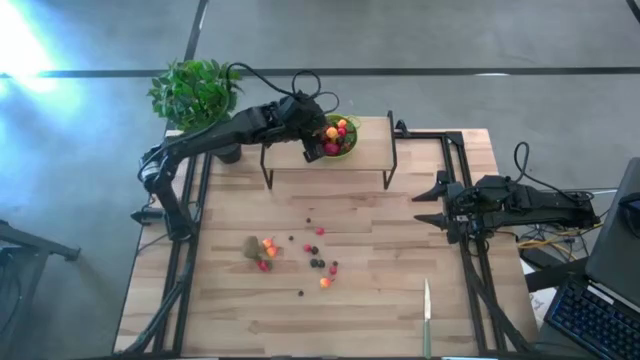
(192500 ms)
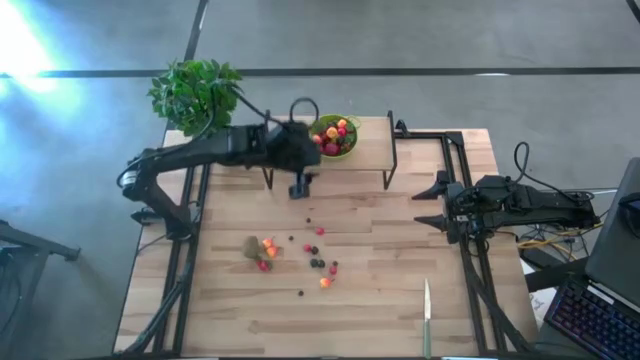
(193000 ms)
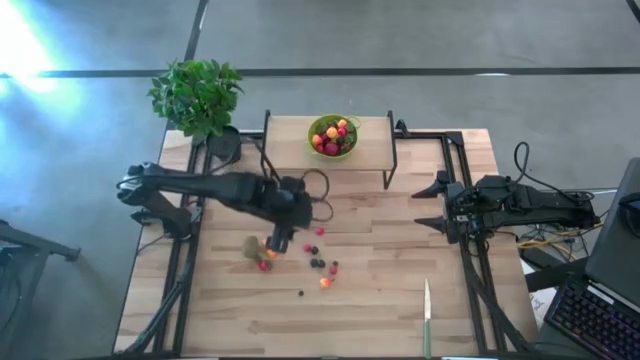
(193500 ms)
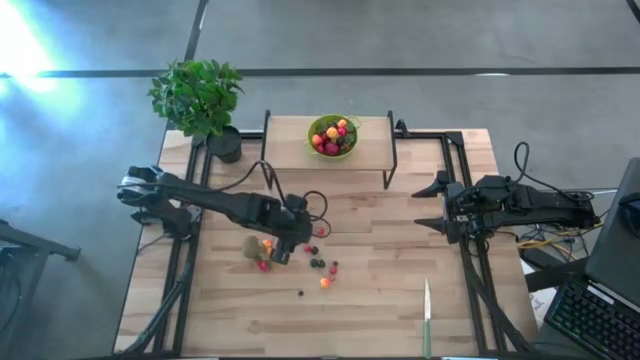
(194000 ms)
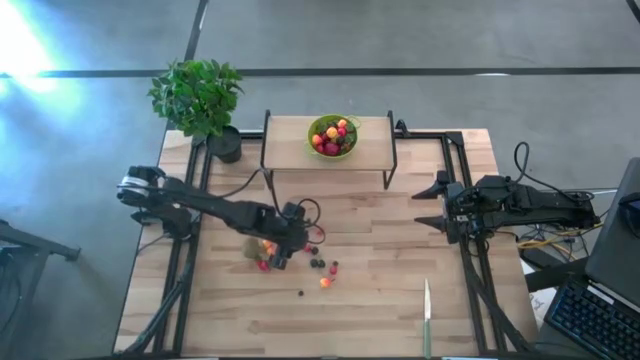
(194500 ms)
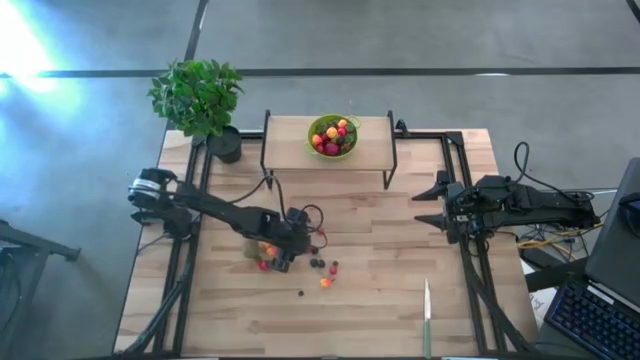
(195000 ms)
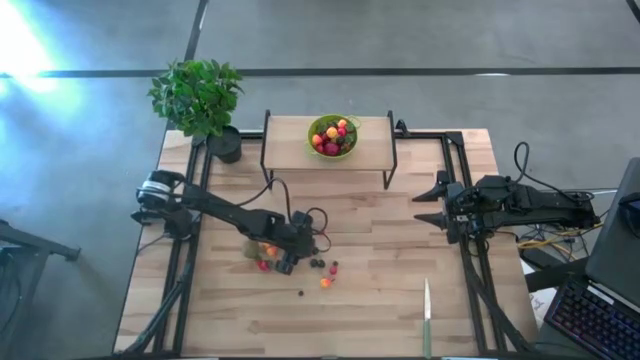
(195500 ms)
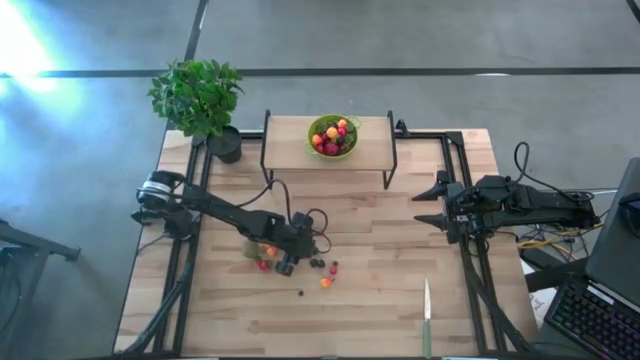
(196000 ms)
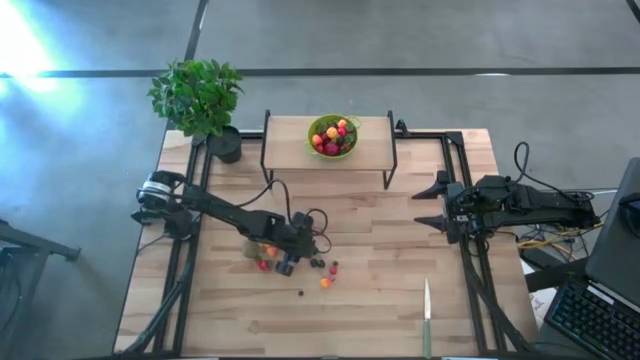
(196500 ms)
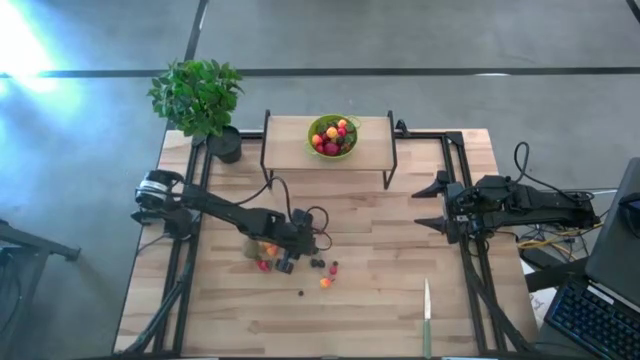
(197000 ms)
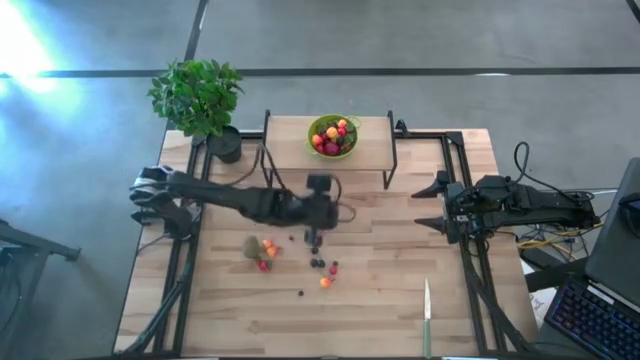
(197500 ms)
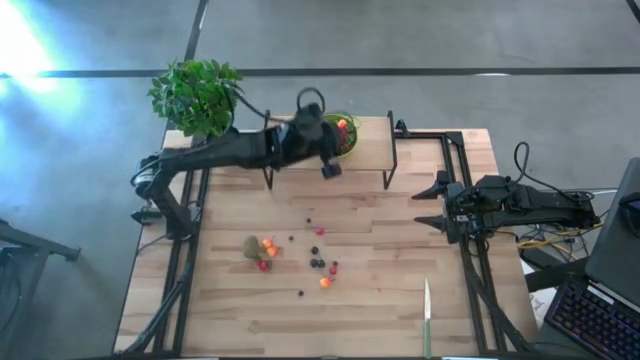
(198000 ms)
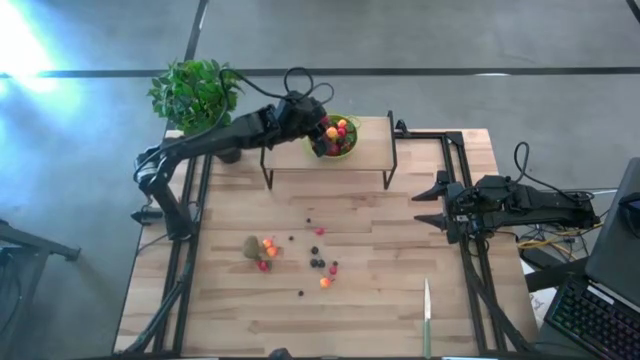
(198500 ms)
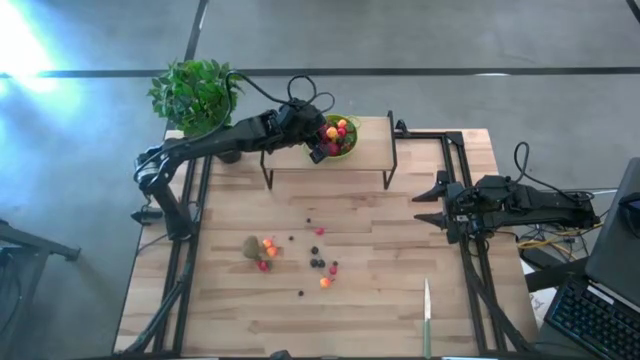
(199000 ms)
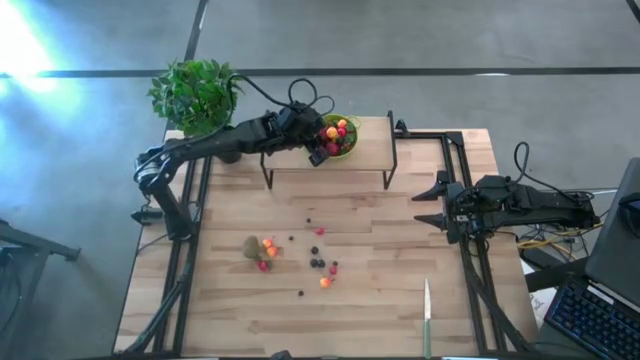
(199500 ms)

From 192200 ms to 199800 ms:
Task: Pick & Place Fruit
Put the red raspberry into the green strainer bowl on the shelf

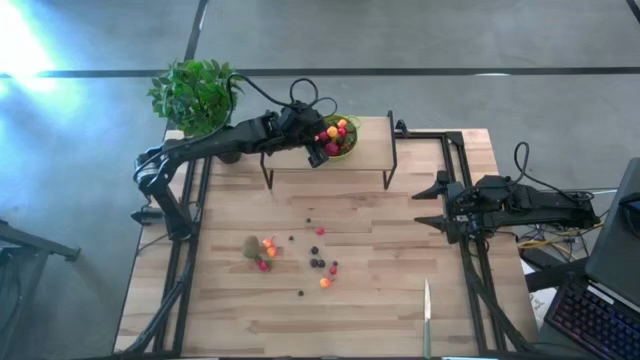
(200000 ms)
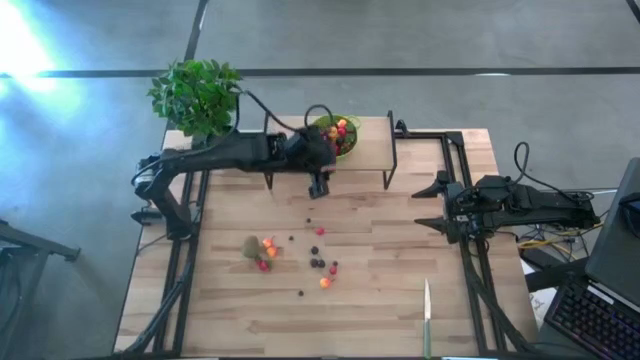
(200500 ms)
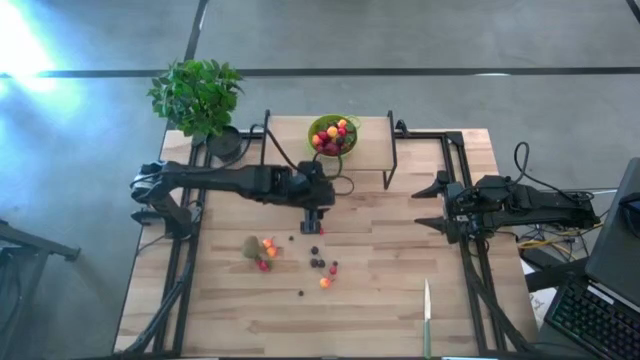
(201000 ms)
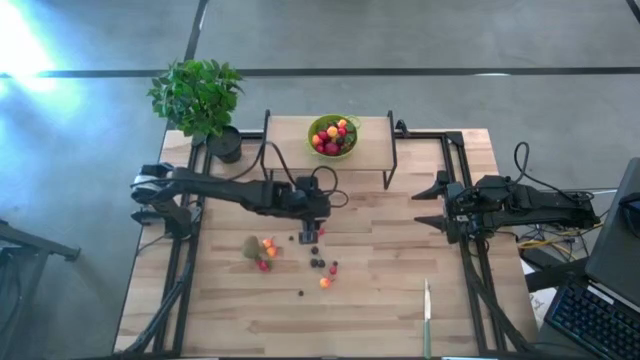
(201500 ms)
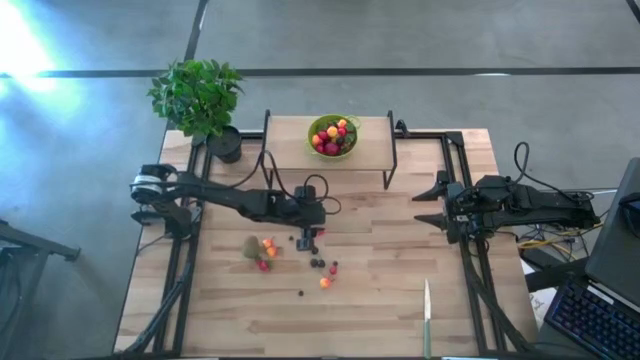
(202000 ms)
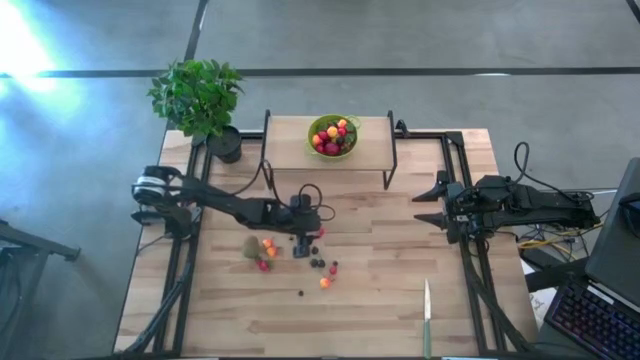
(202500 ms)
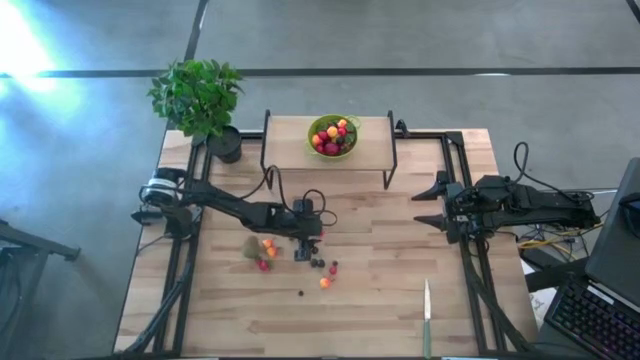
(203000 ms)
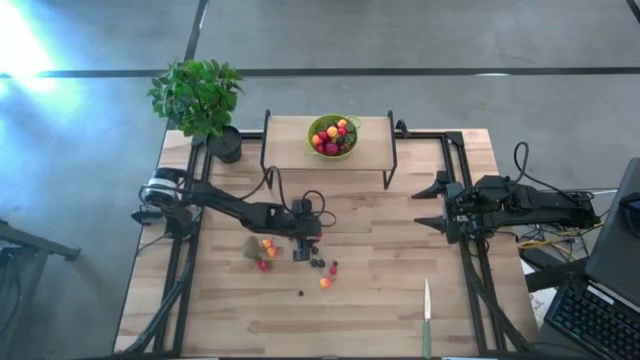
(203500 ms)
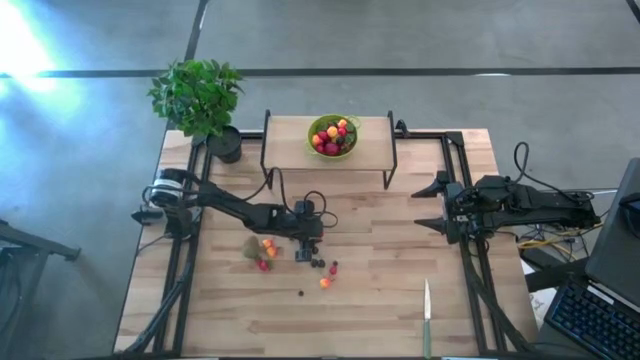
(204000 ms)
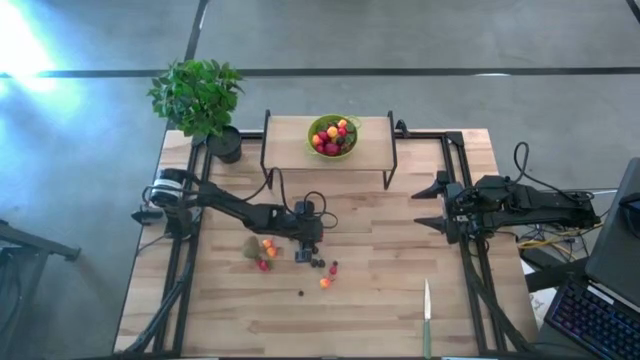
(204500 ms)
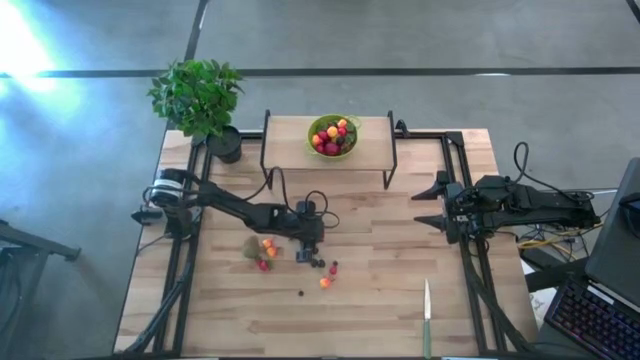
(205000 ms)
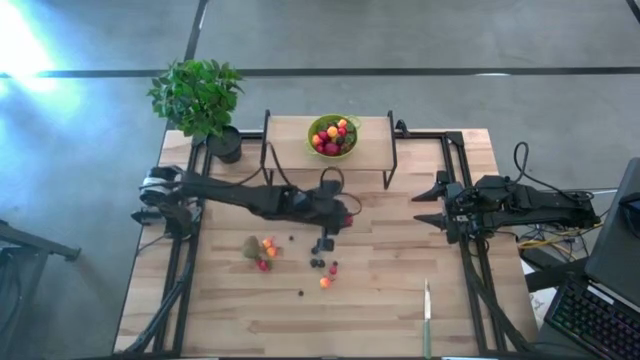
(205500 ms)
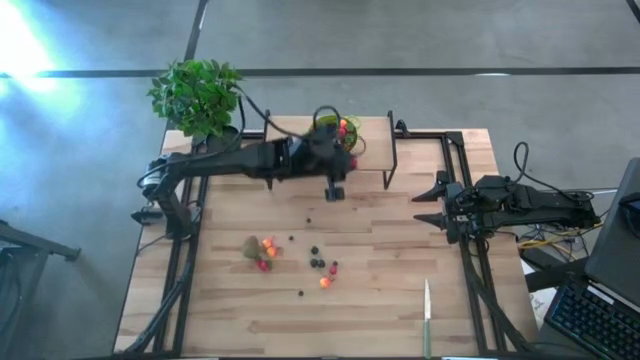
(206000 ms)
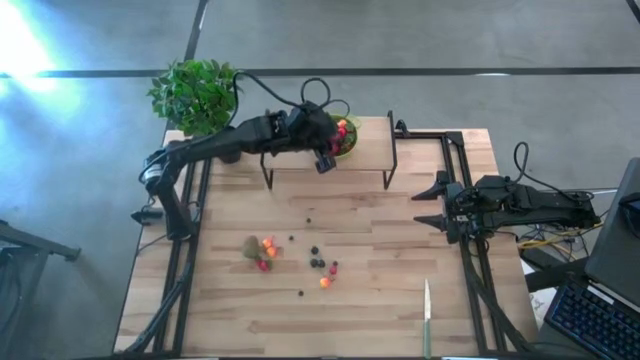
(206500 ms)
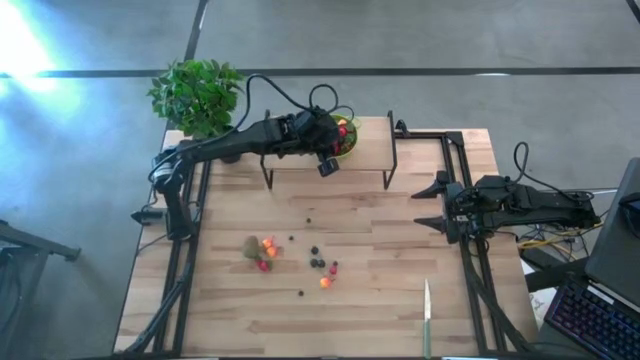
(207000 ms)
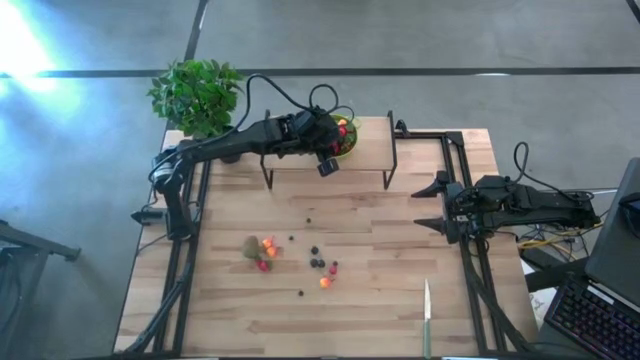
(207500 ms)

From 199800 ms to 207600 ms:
Put the red raspberry into the green strainer bowl on the shelf

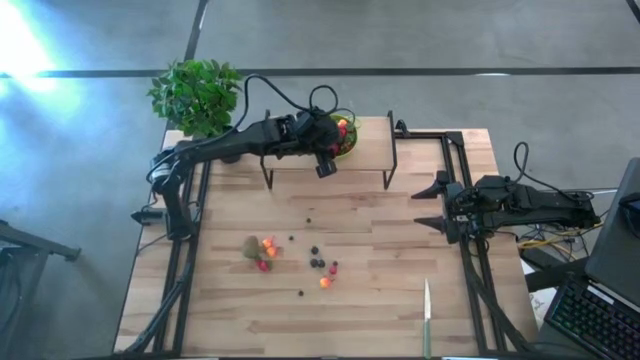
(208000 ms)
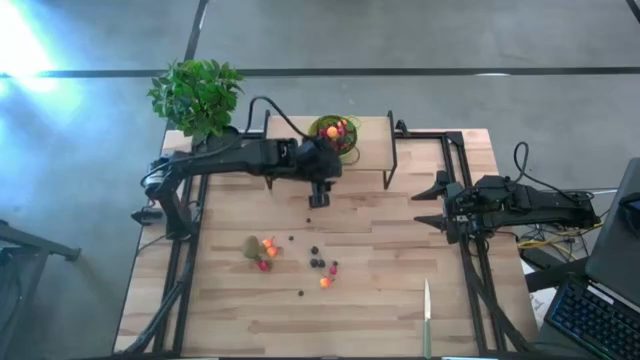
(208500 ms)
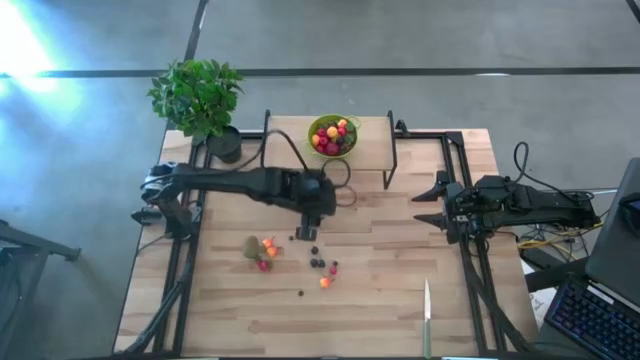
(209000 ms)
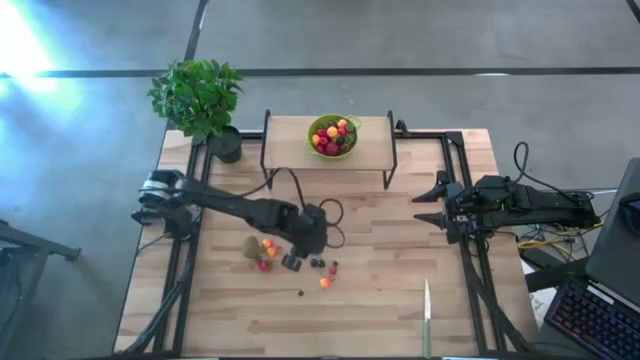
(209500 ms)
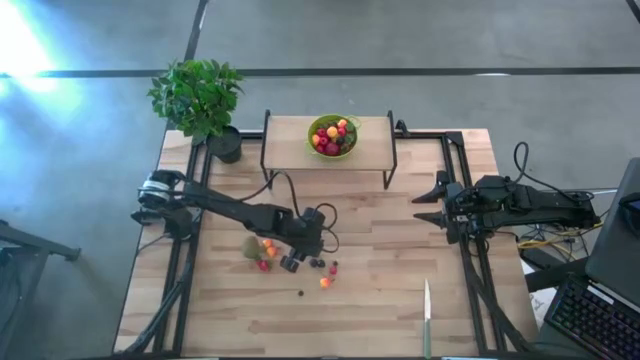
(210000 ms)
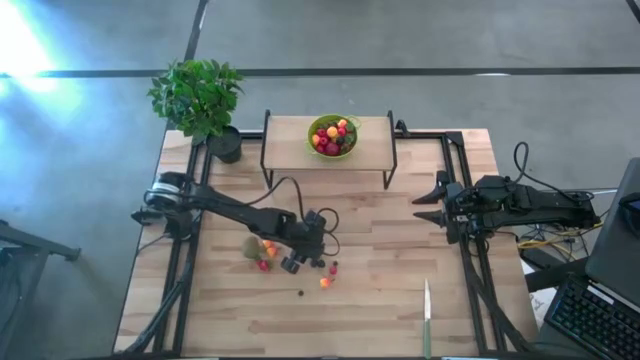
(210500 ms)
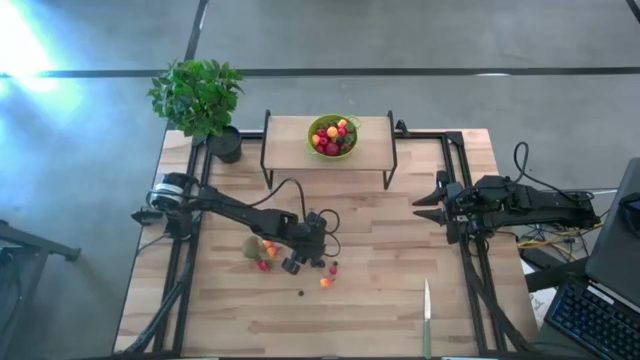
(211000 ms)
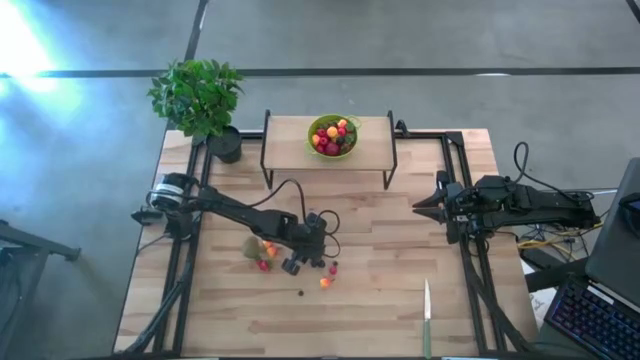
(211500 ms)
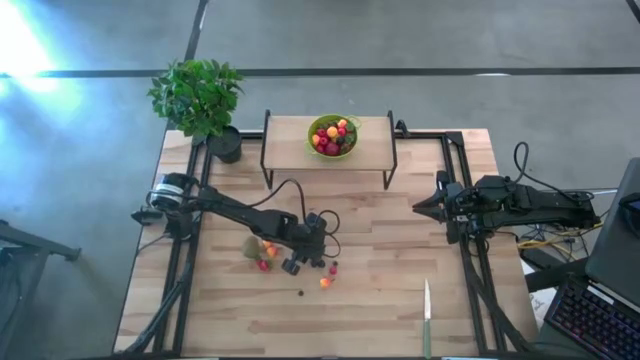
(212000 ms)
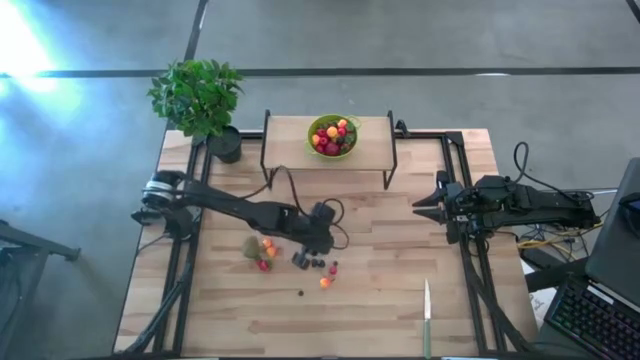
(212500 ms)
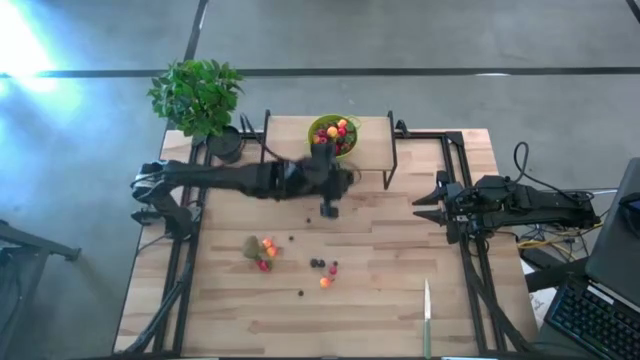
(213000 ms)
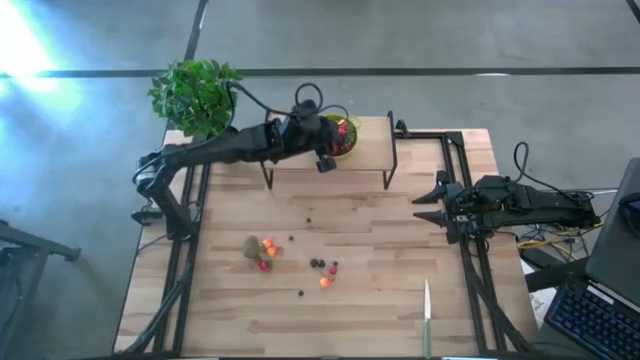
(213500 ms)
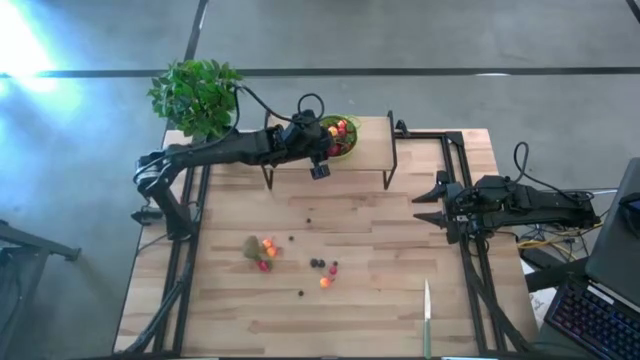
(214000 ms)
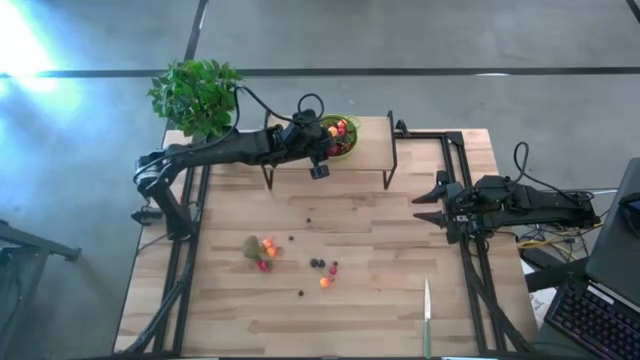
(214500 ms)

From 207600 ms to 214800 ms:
Put the black cherry into the green strainer bowl on the shelf
